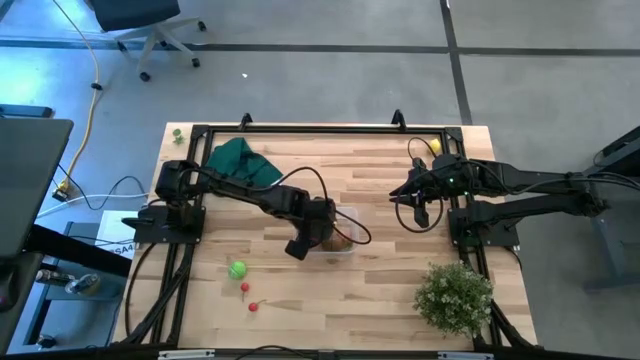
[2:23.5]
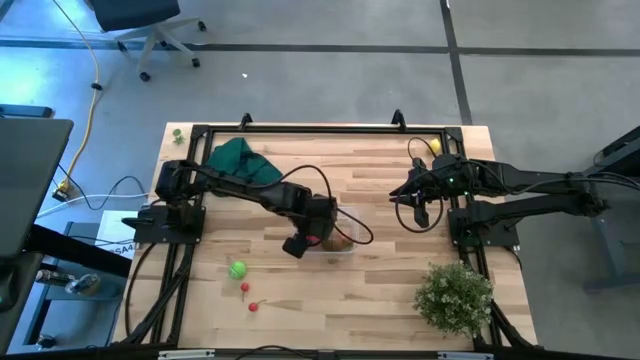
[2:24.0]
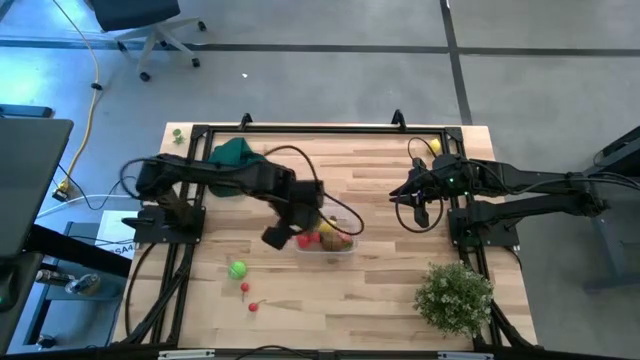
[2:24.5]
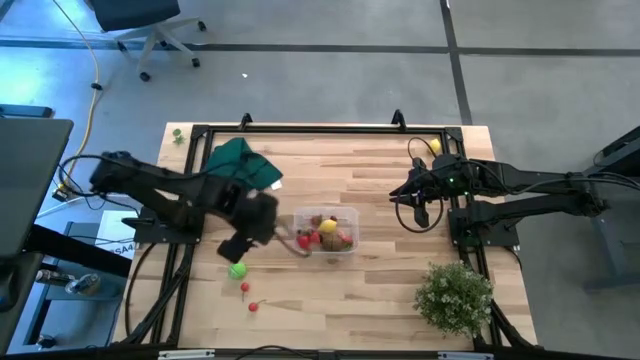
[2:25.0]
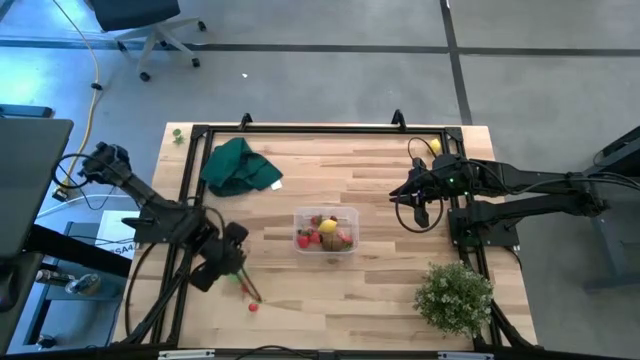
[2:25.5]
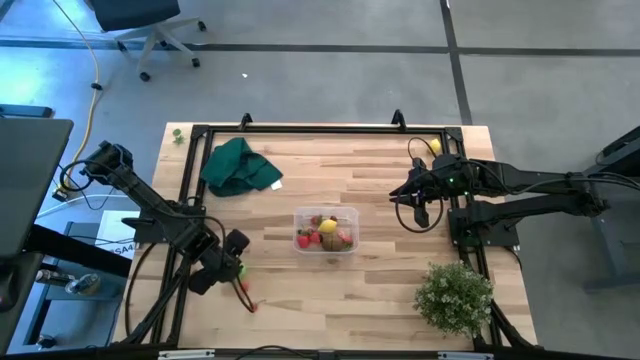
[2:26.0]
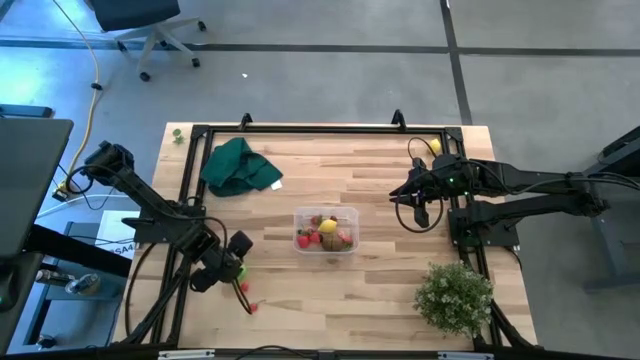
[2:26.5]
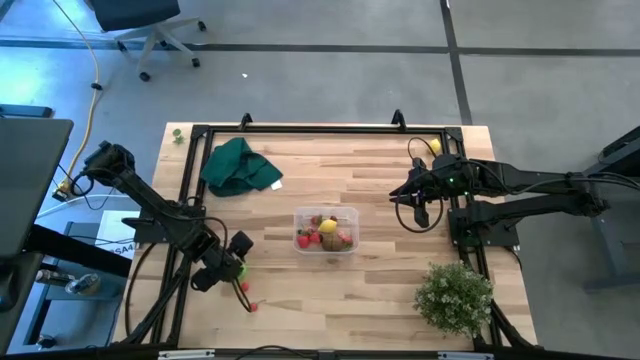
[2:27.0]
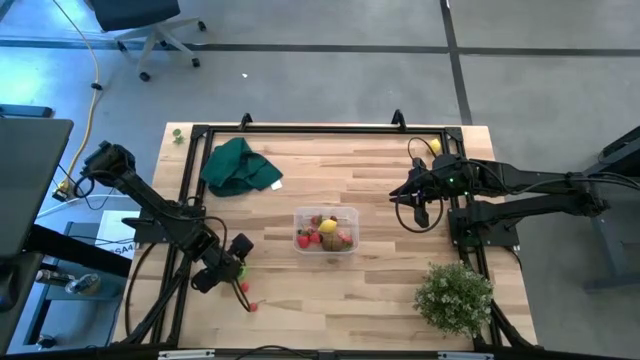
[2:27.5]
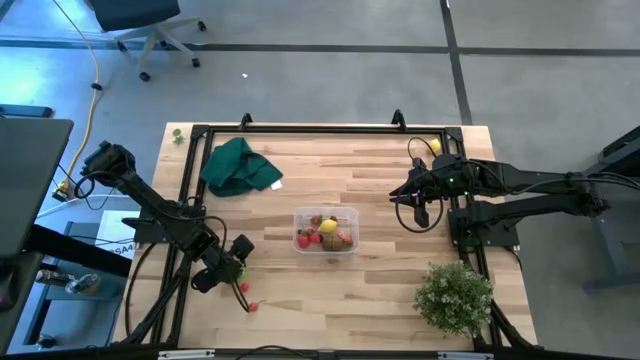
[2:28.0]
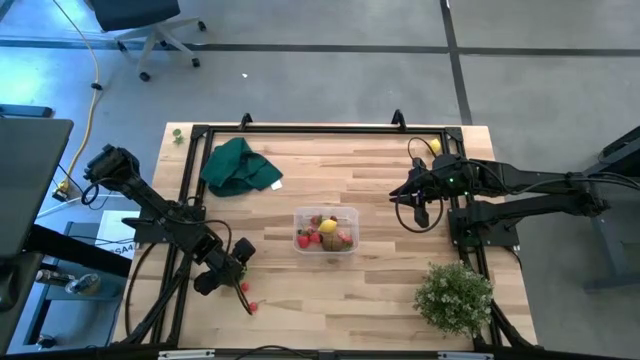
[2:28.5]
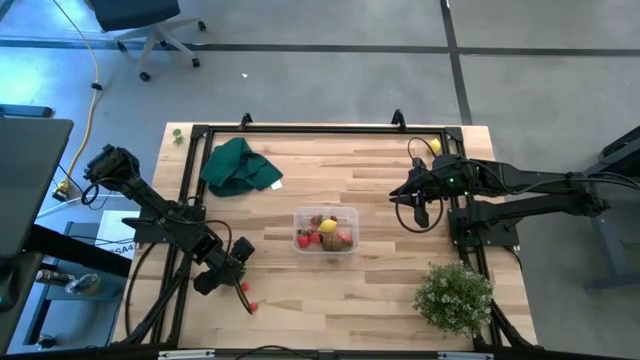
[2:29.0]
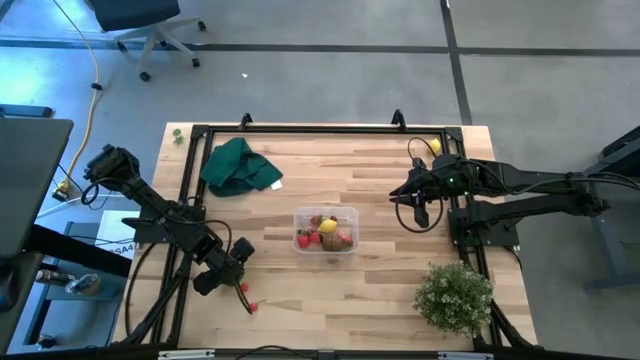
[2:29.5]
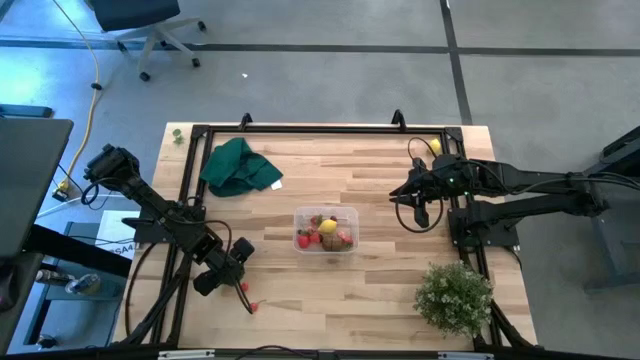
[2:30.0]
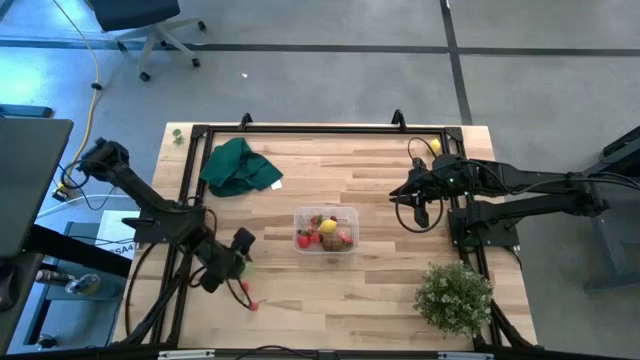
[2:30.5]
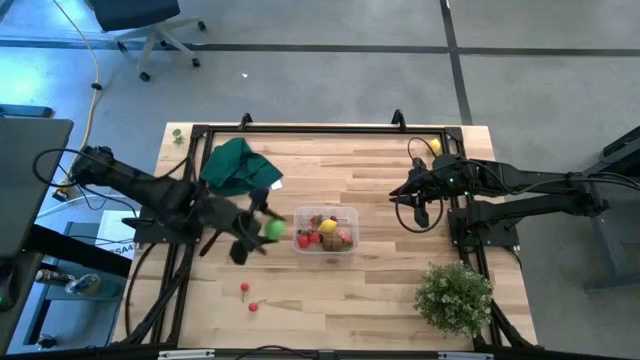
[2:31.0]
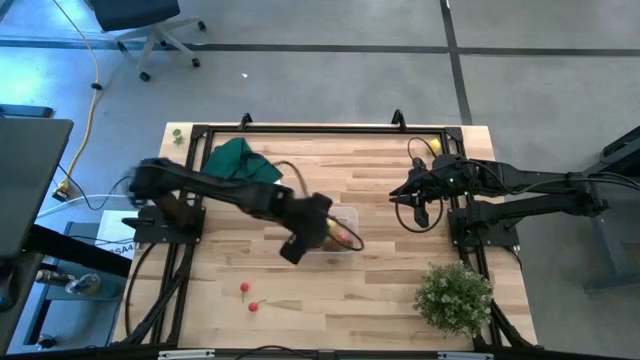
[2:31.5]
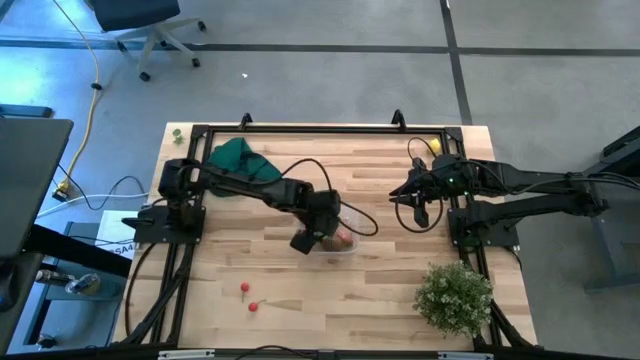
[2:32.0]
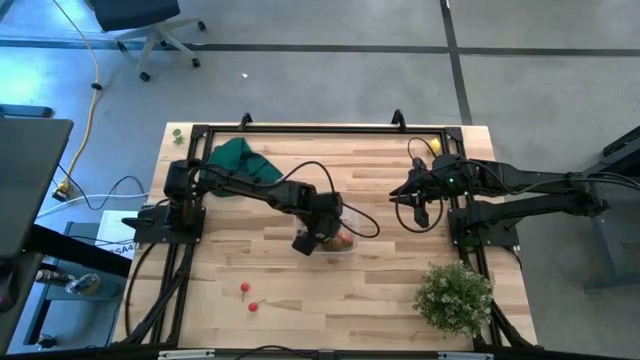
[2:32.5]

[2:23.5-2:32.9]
Task: Pick and placing Produce into tupperware
Put the green cabbage into the transparent bin

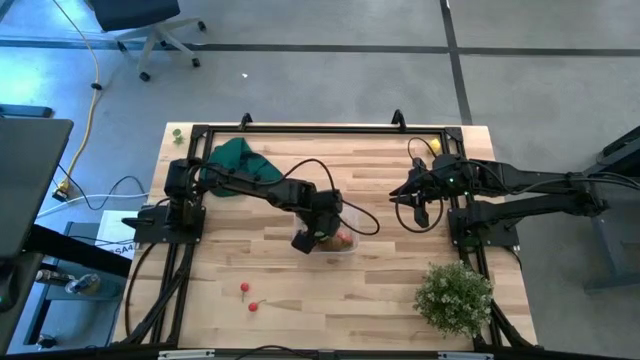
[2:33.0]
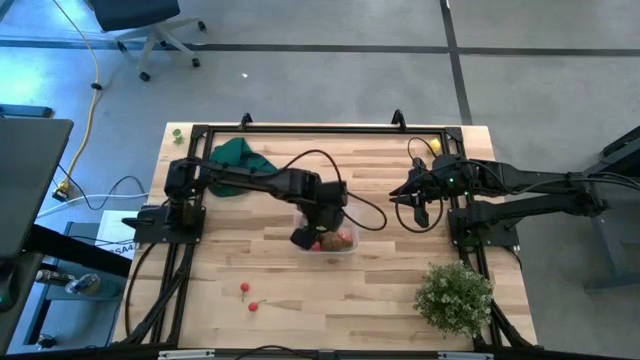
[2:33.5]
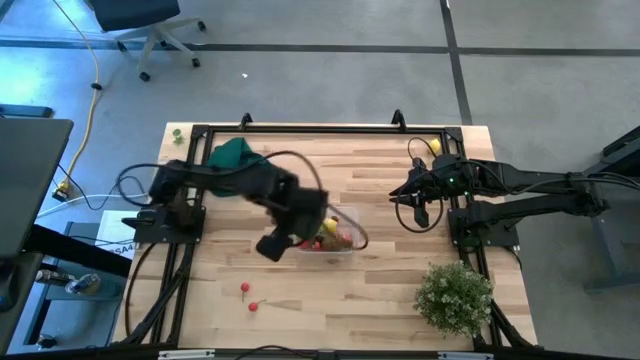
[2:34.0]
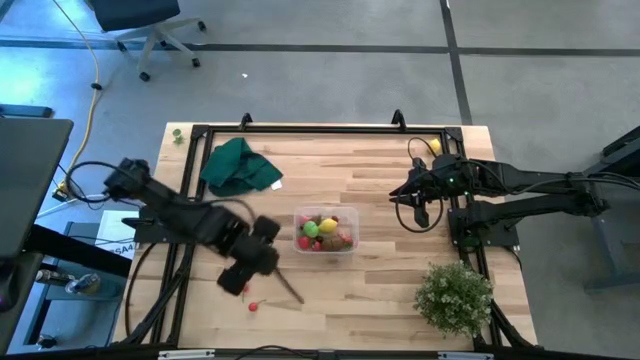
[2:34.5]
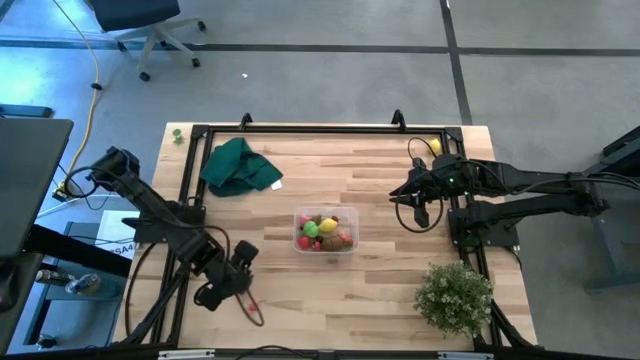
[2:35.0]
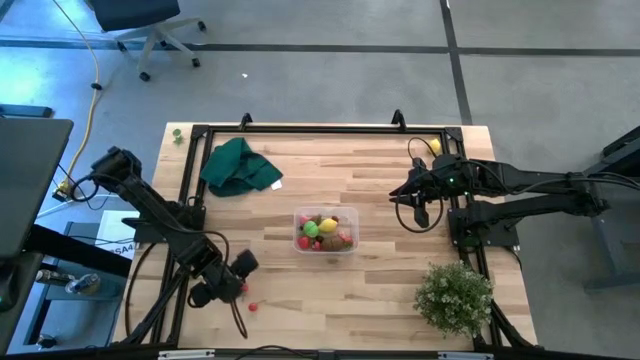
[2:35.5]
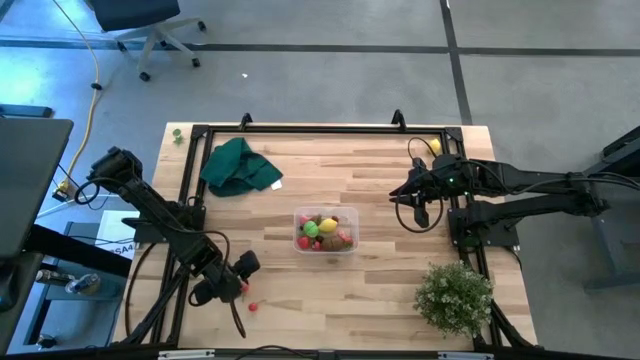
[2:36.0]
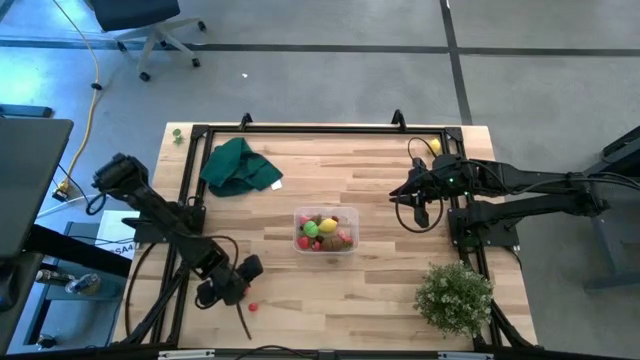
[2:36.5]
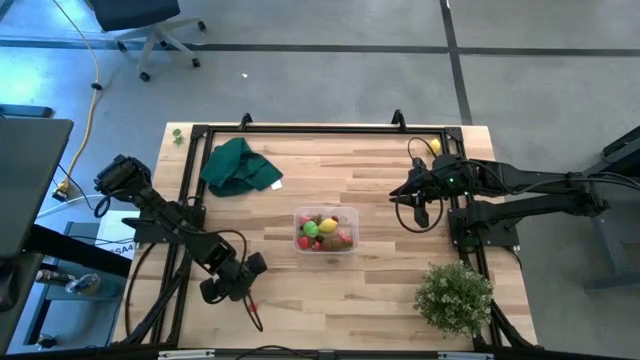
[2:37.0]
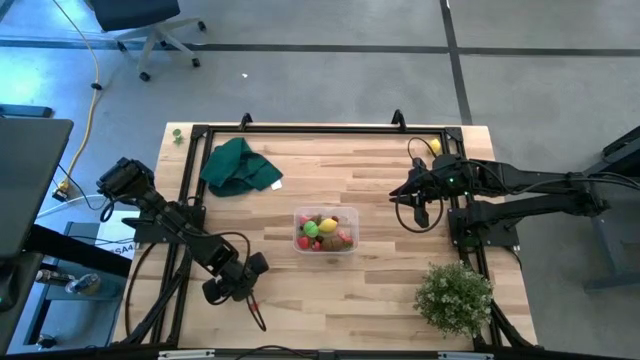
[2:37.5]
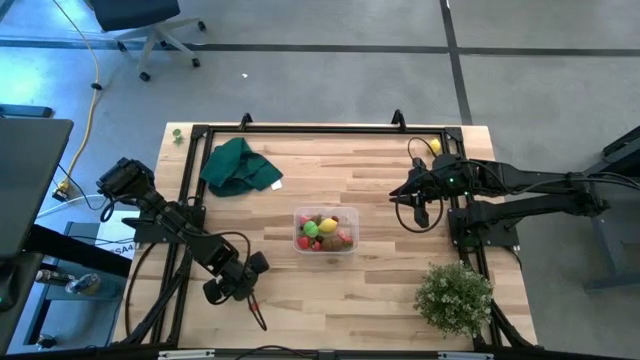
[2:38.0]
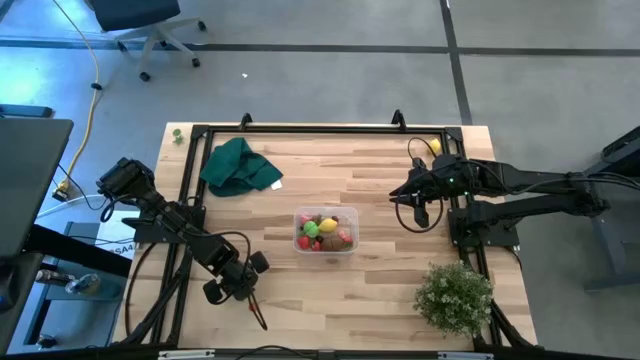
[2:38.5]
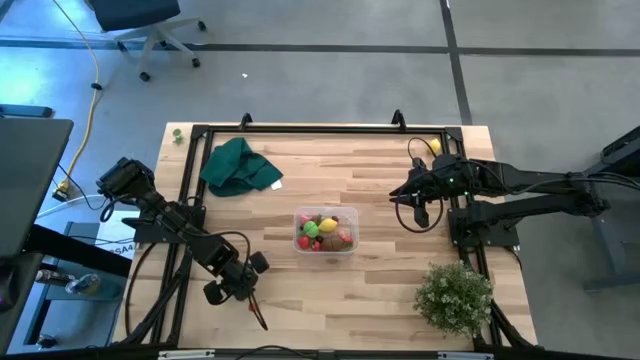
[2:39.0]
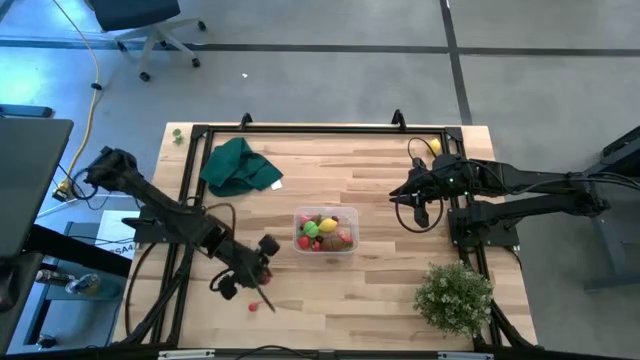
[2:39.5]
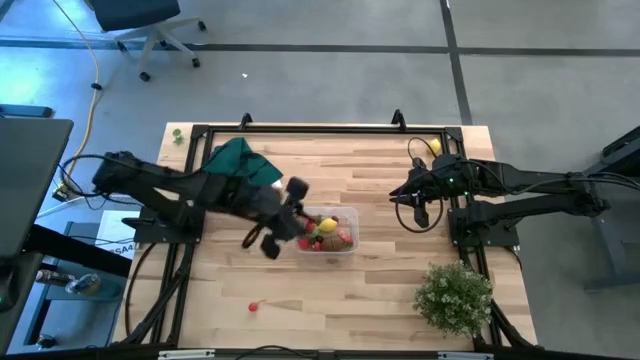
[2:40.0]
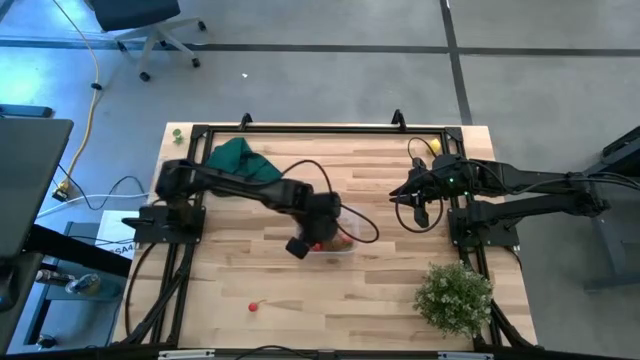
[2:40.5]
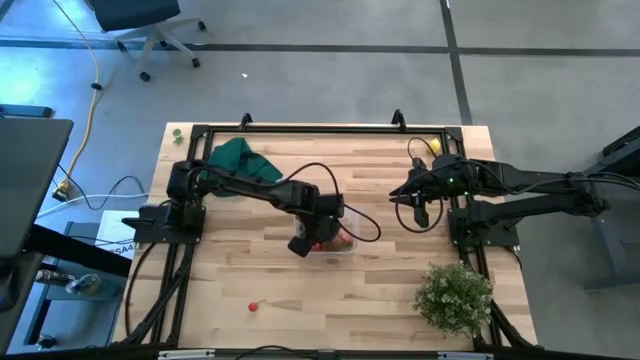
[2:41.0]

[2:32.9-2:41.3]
Put the top red cherry into the transparent bin

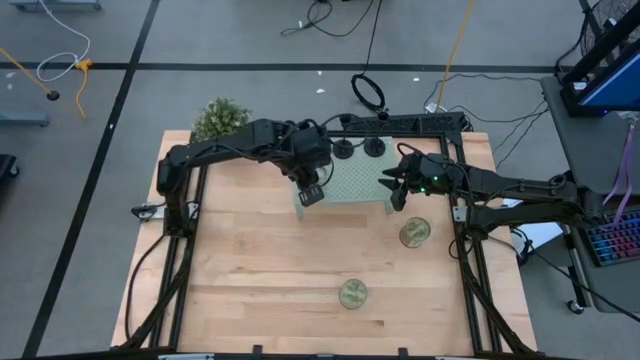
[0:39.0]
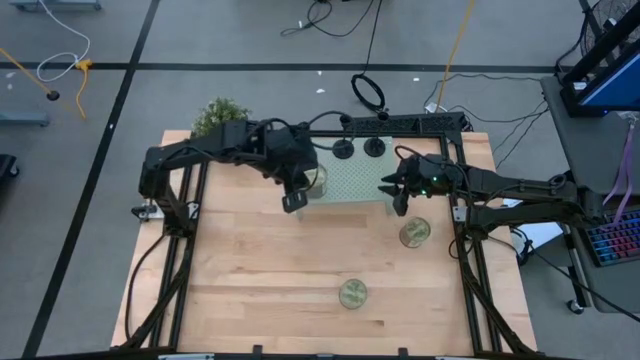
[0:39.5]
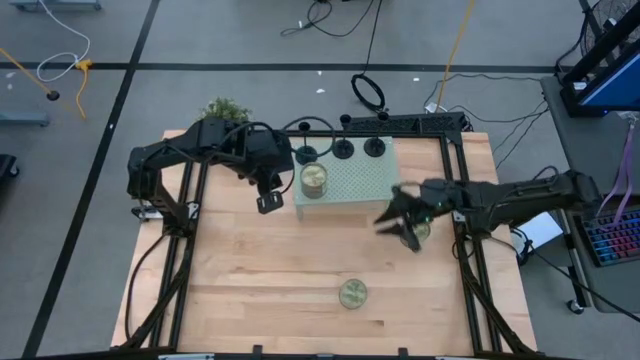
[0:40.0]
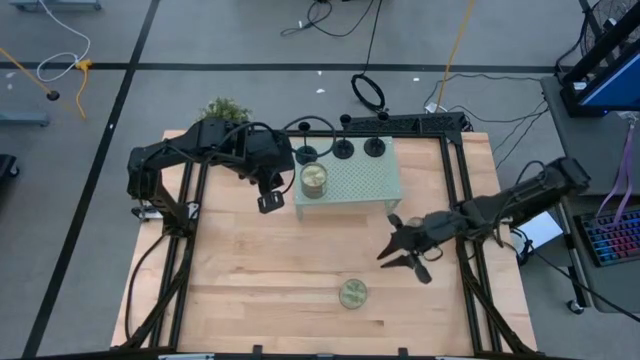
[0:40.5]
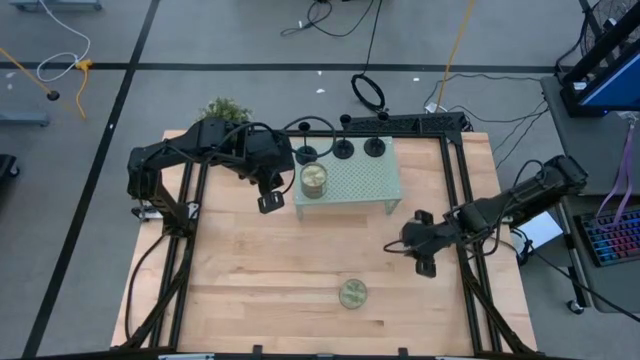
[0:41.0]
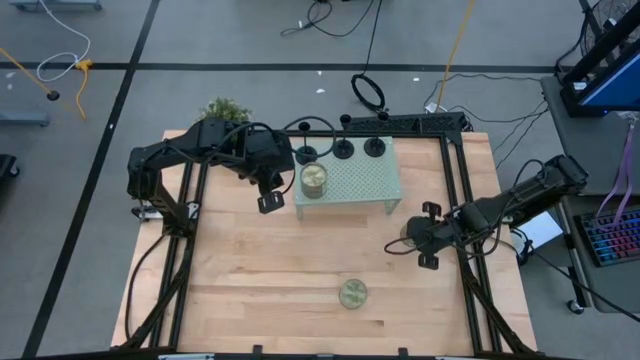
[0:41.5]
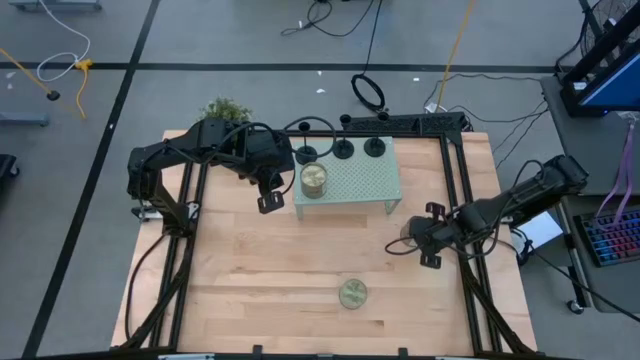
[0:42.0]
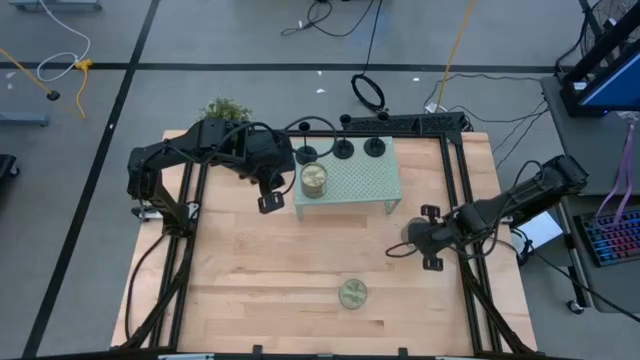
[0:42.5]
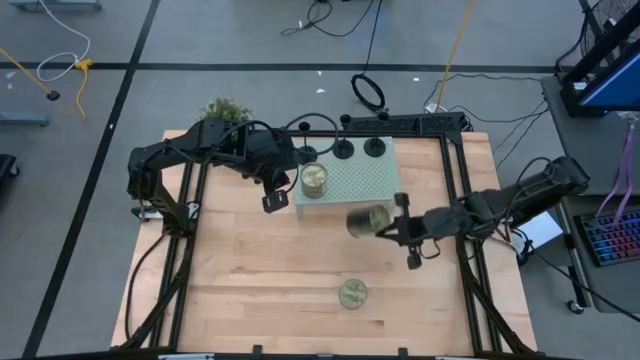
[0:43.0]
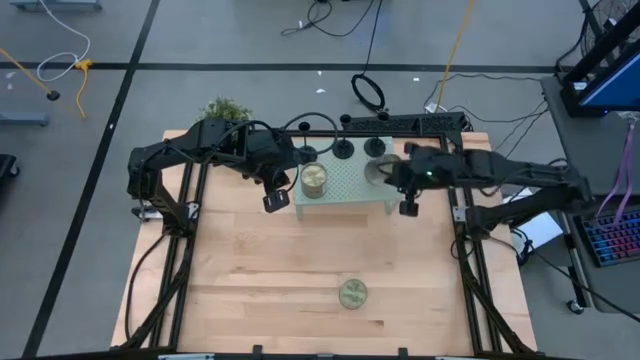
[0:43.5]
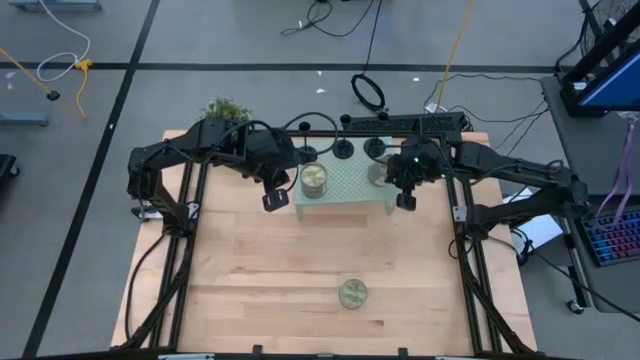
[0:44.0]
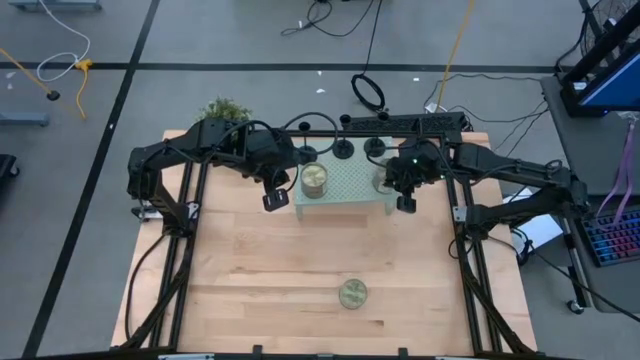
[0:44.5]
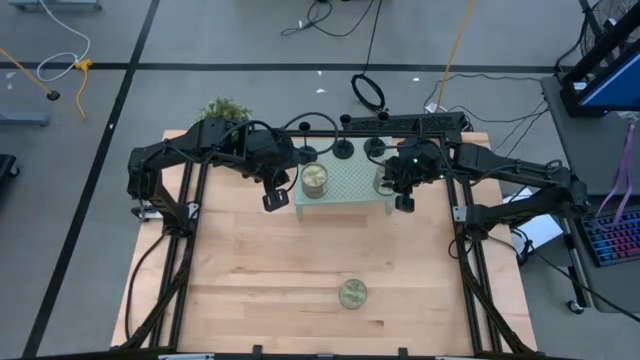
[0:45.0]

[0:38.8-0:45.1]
Task: Pick & Place candle stick holders
Align the top green scented candle with the green scented candle on the shelf
